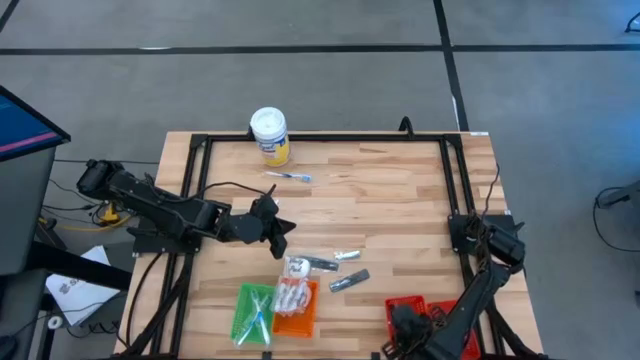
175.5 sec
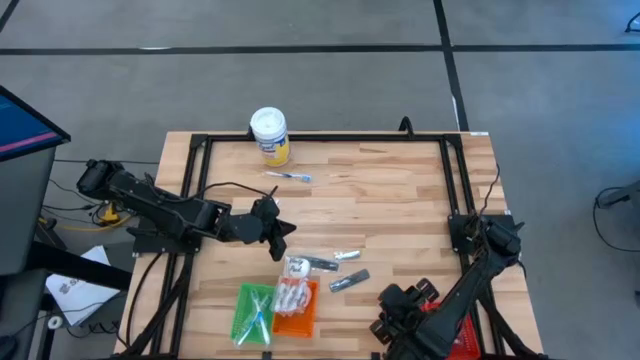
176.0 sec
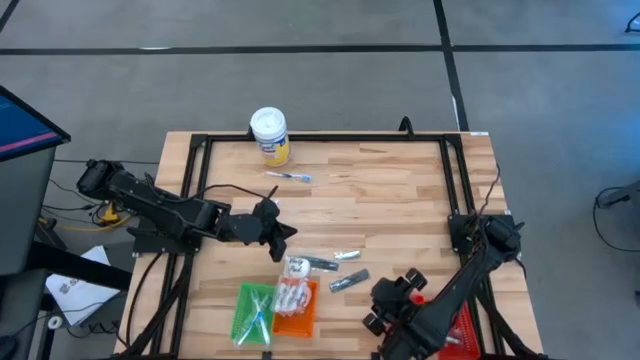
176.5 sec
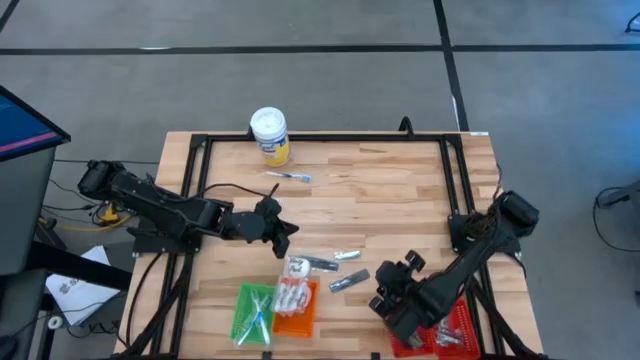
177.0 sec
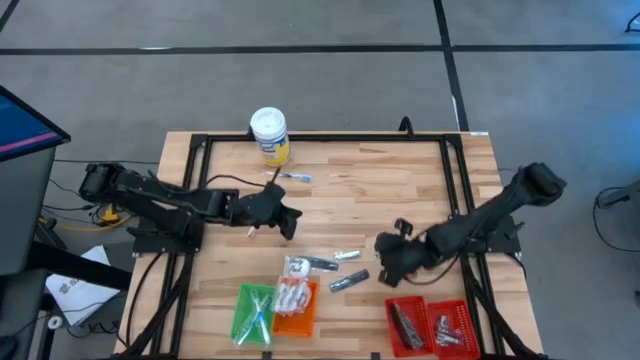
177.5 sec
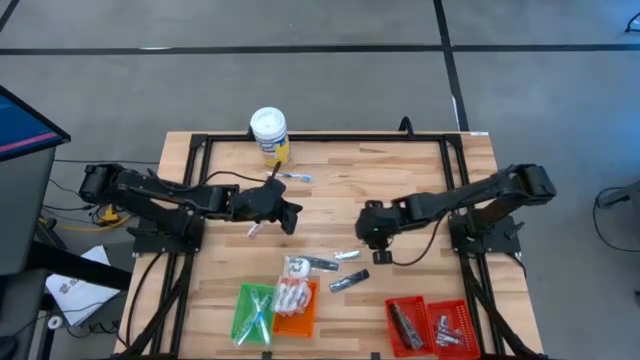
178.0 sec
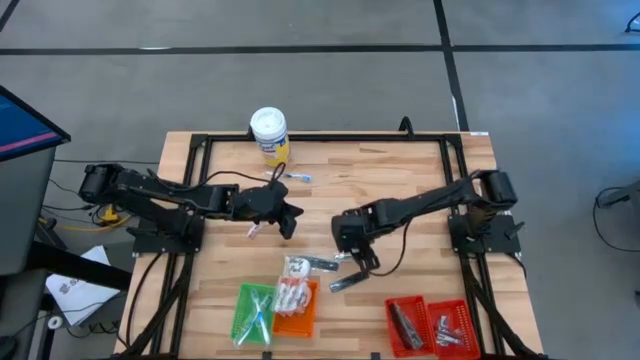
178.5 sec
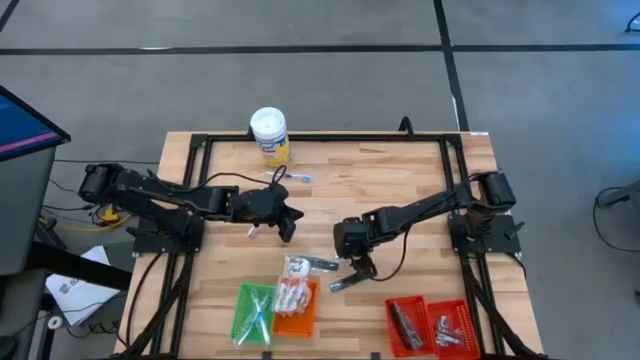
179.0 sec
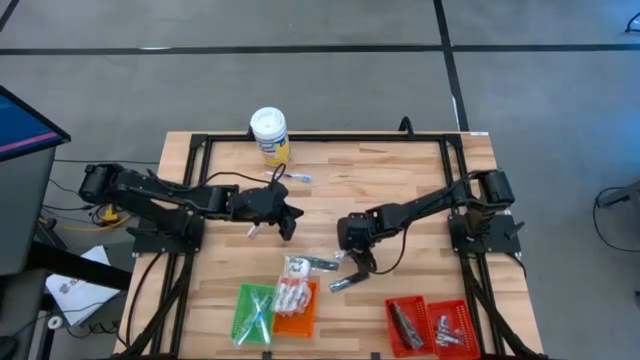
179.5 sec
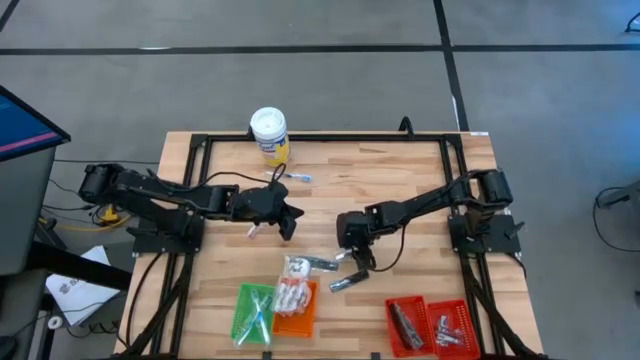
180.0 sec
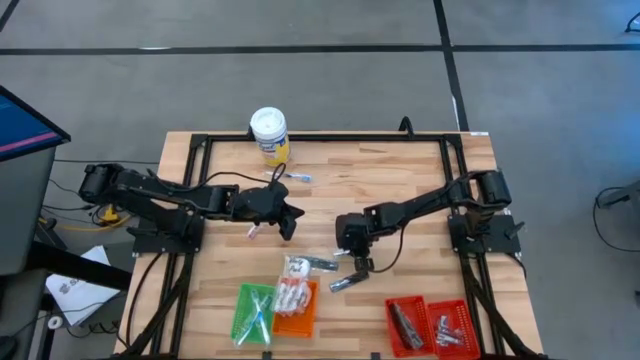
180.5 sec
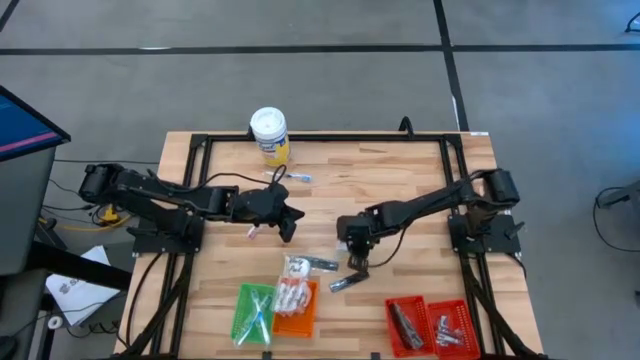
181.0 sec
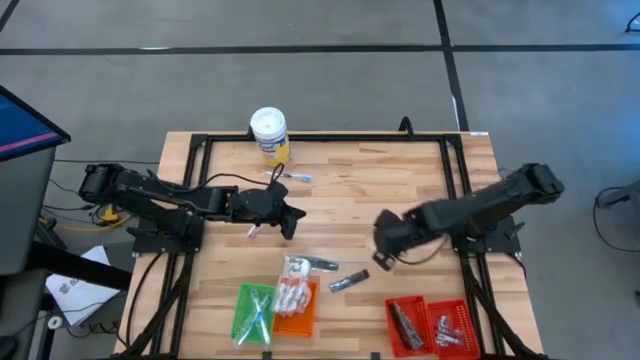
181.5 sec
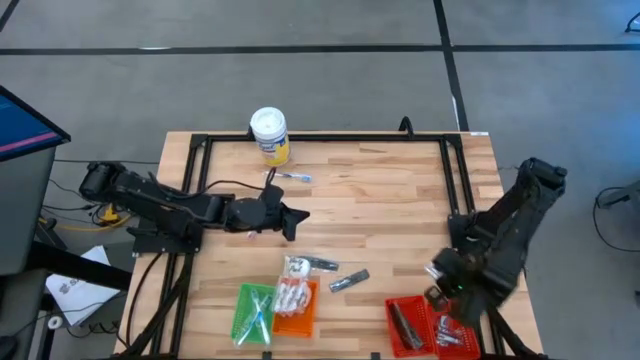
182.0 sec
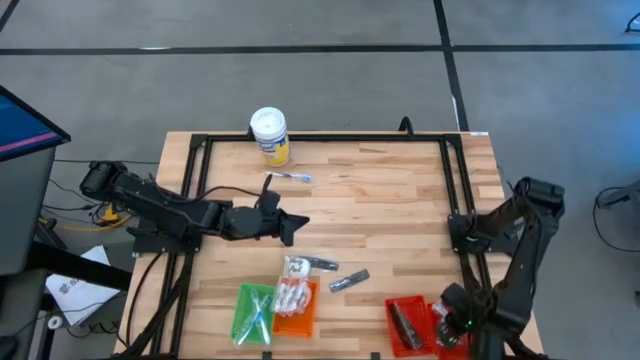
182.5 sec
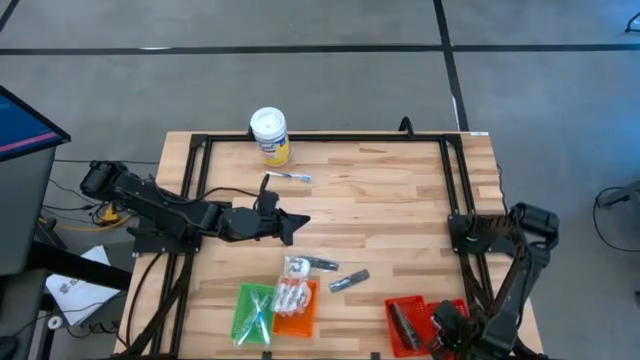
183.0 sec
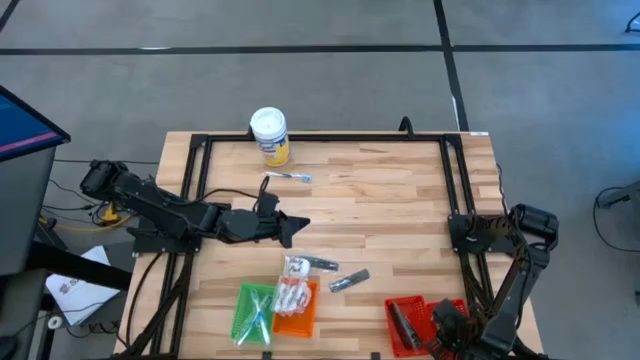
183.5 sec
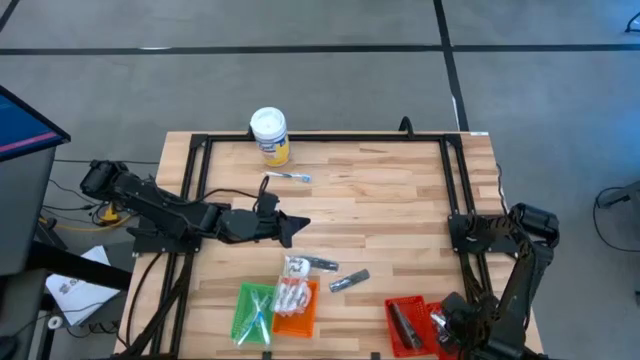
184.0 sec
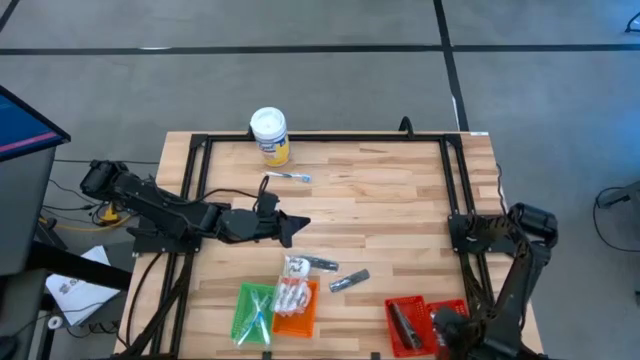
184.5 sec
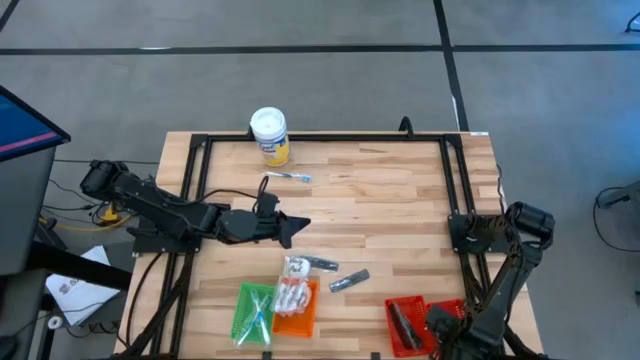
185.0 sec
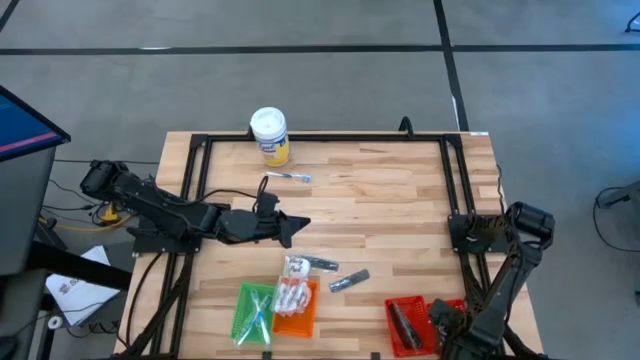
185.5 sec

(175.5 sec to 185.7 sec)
Task: Pick & Place Travel size toiletries
Put the silver nail cutter into the right red basket

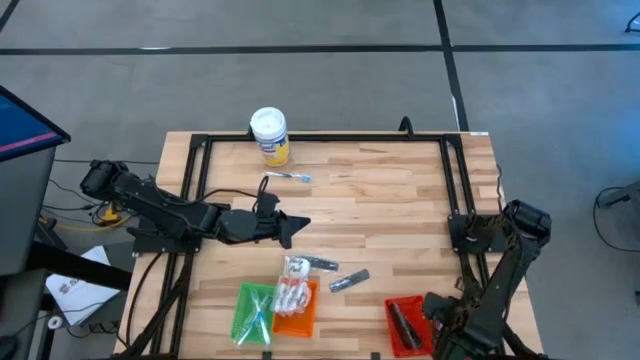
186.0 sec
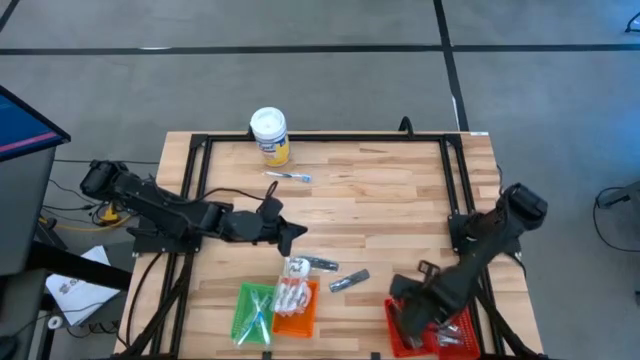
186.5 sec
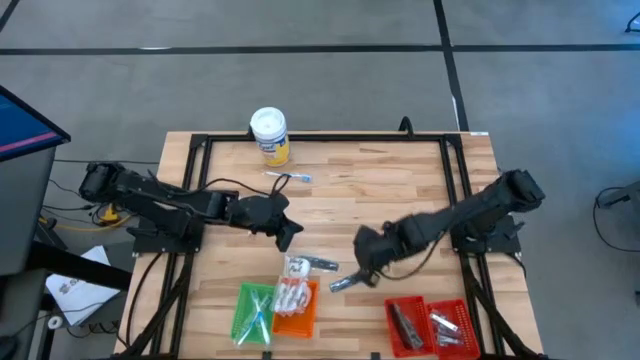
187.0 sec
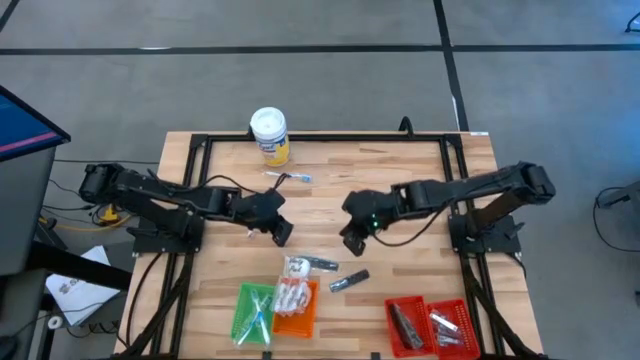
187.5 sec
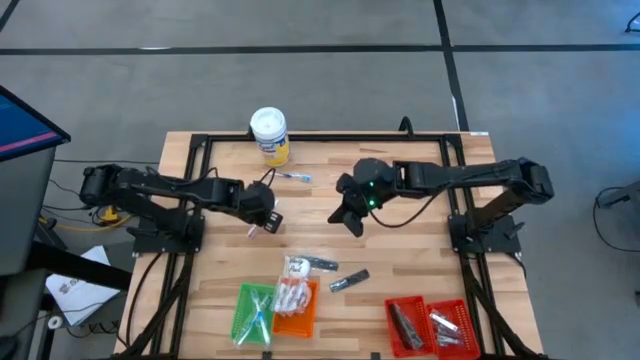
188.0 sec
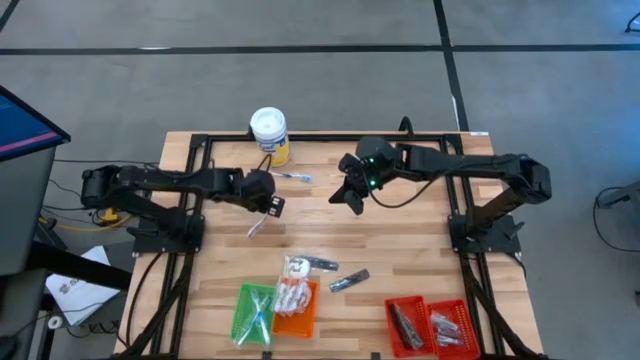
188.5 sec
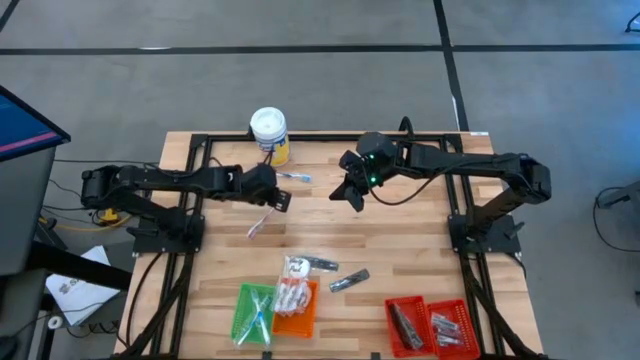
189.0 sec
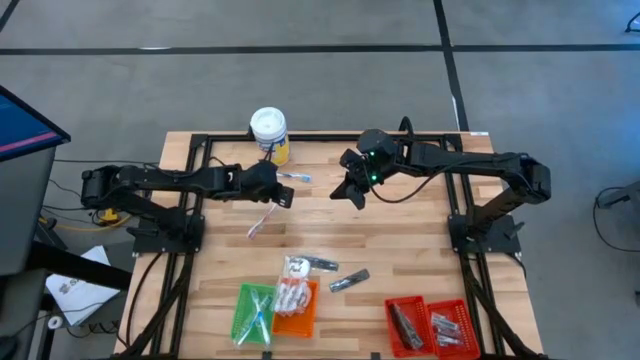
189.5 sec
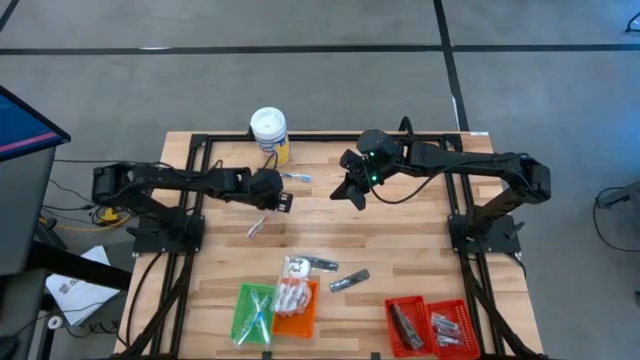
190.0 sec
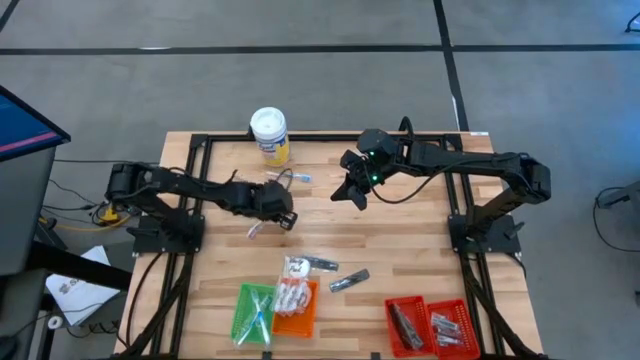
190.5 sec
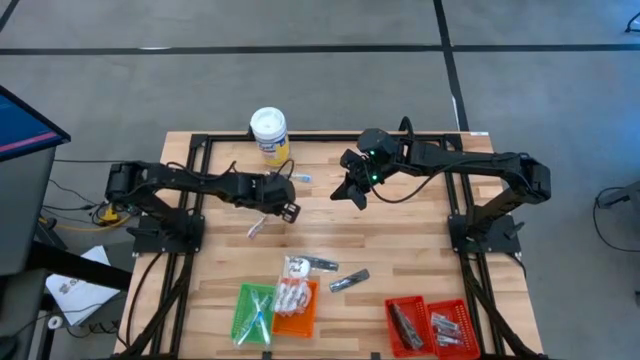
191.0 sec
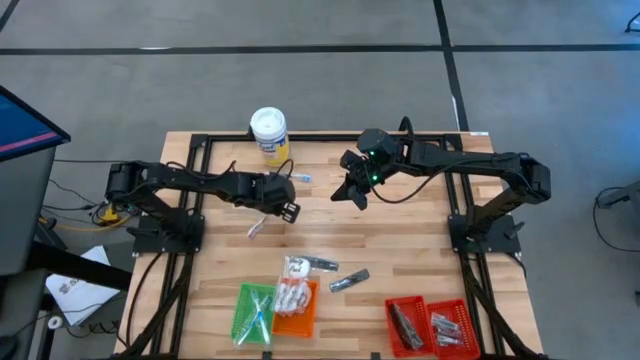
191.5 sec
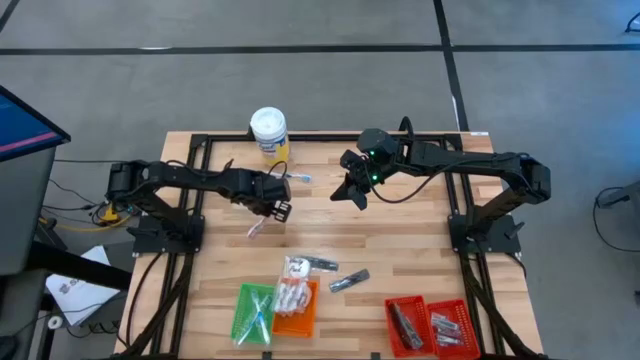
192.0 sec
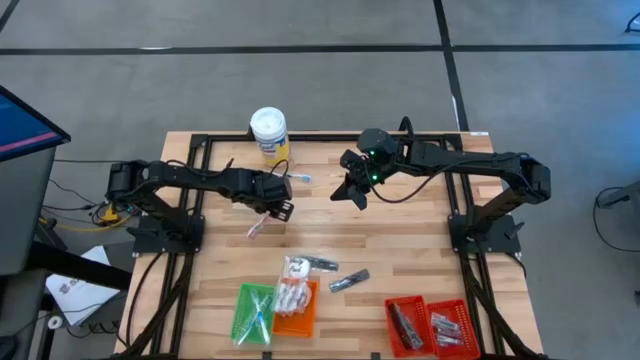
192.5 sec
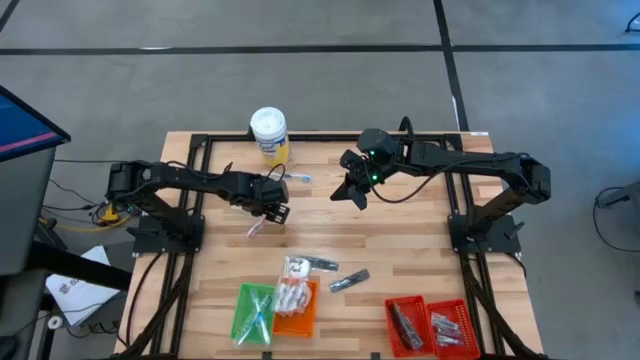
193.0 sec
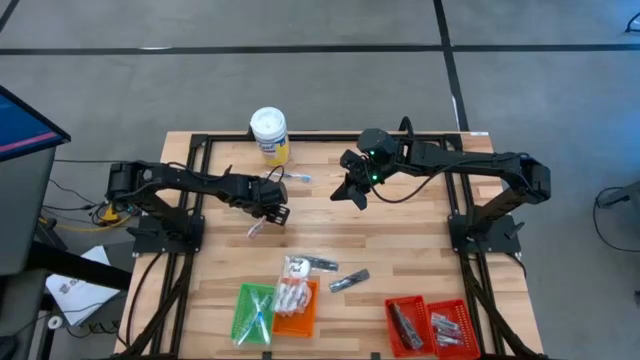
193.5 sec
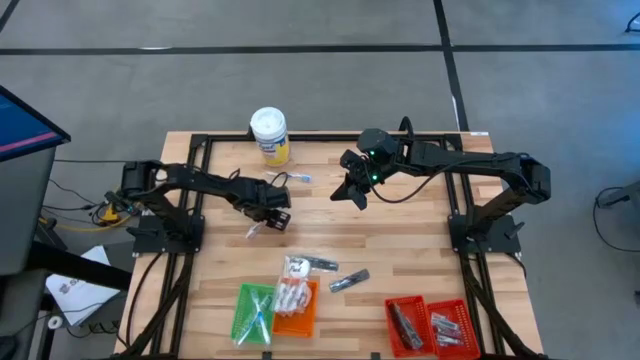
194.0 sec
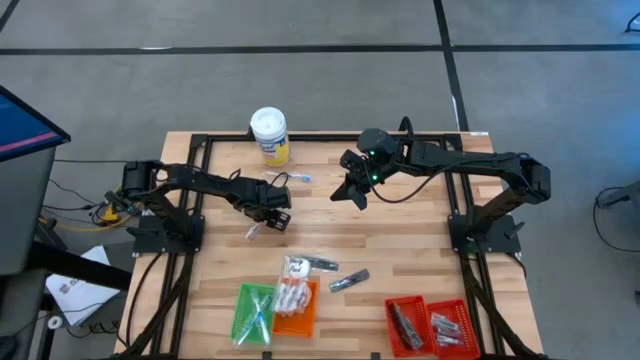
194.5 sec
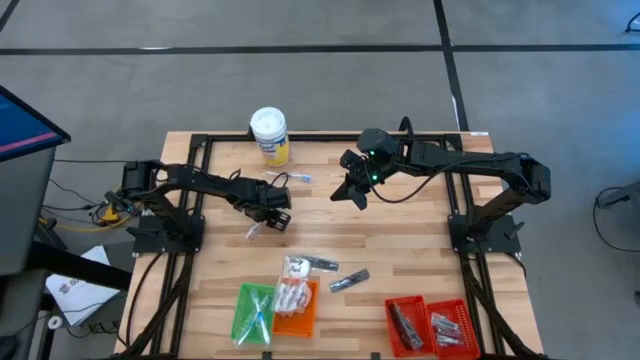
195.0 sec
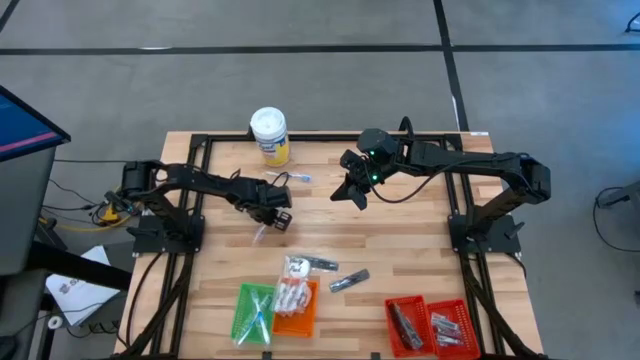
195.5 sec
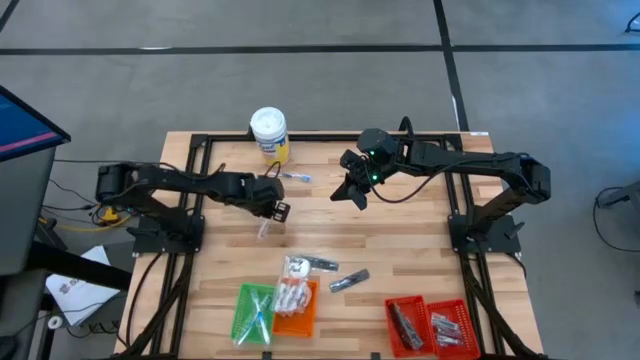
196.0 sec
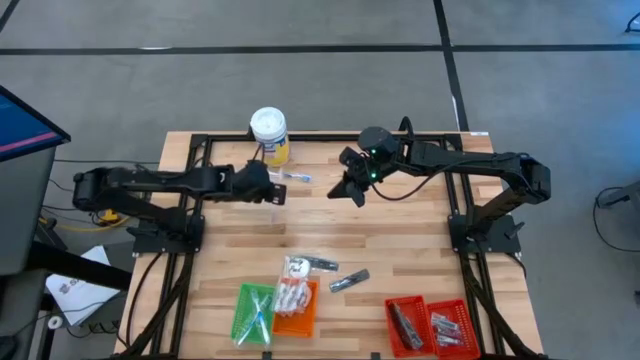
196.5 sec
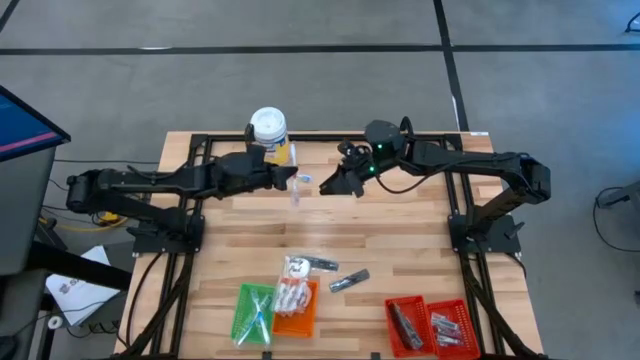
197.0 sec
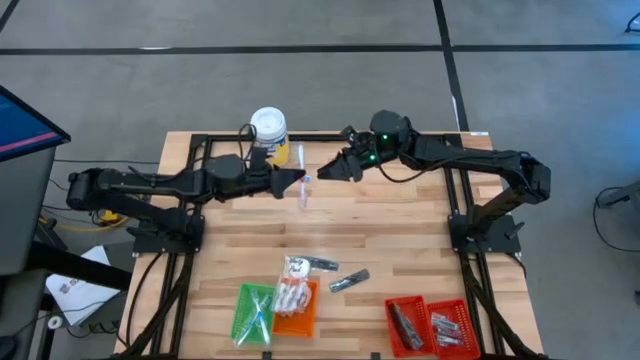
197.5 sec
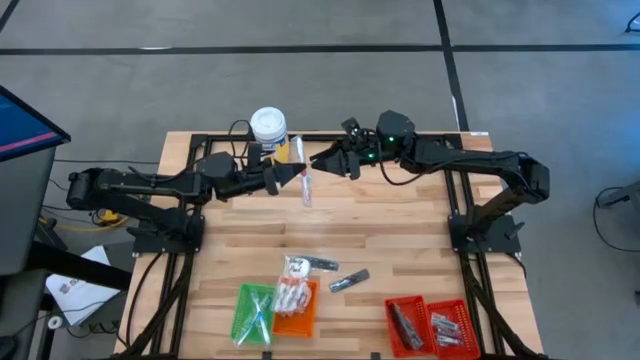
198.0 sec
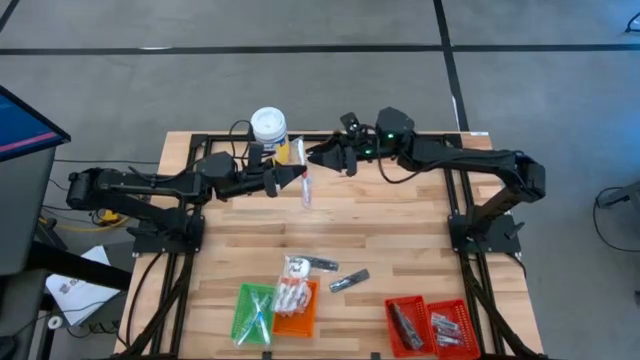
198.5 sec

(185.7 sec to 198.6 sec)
Put the orange toothbrush into the green basket
